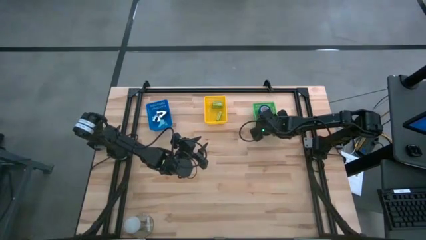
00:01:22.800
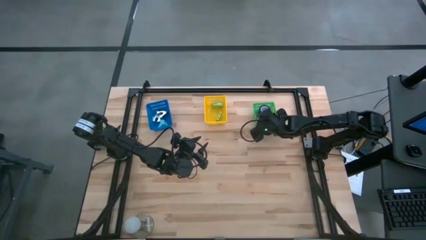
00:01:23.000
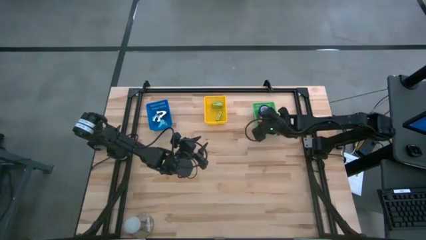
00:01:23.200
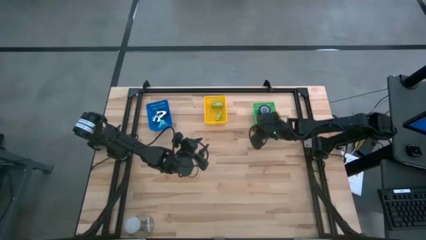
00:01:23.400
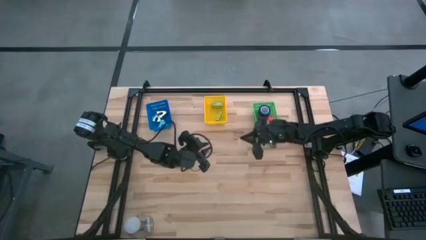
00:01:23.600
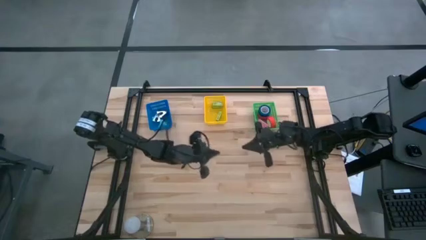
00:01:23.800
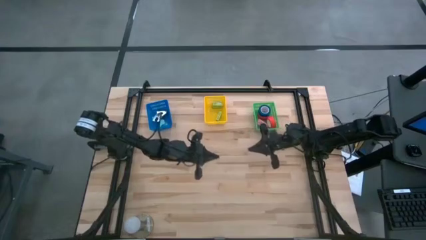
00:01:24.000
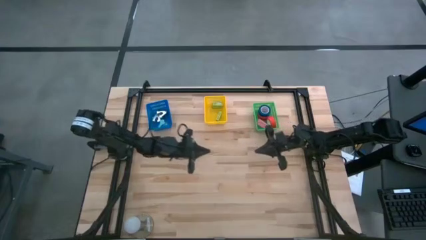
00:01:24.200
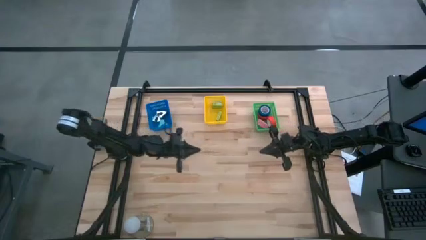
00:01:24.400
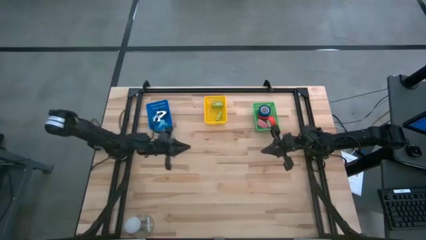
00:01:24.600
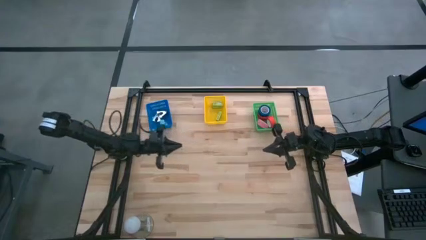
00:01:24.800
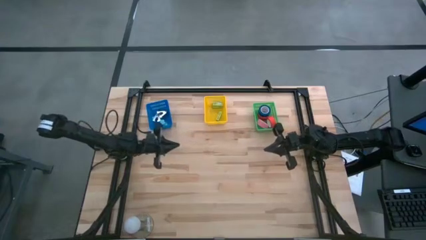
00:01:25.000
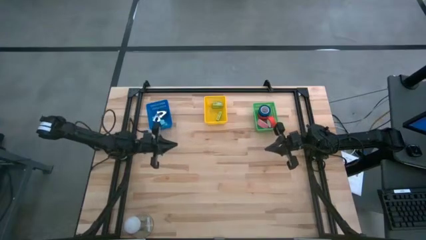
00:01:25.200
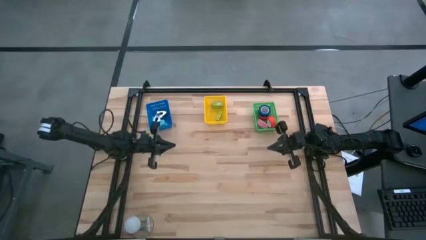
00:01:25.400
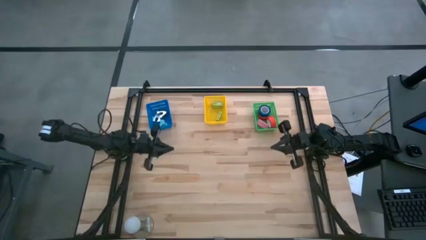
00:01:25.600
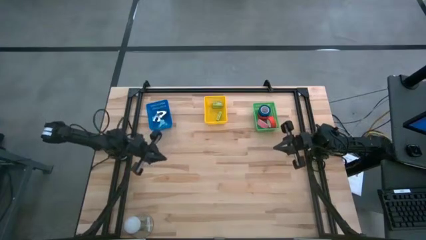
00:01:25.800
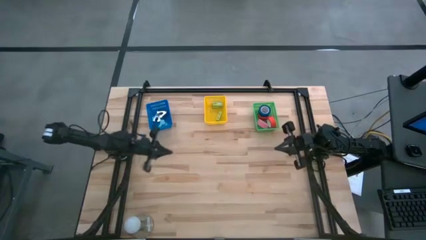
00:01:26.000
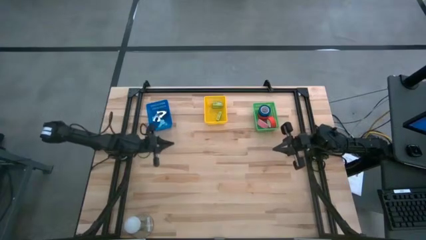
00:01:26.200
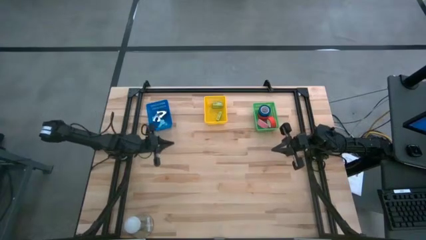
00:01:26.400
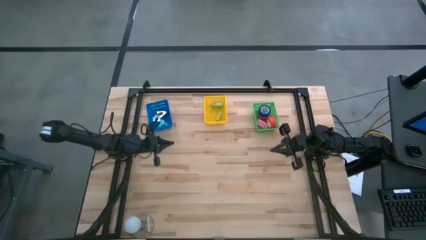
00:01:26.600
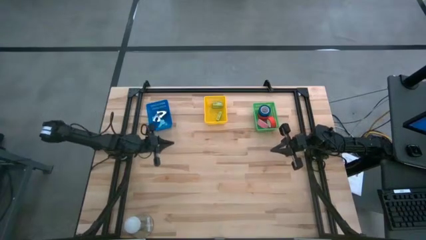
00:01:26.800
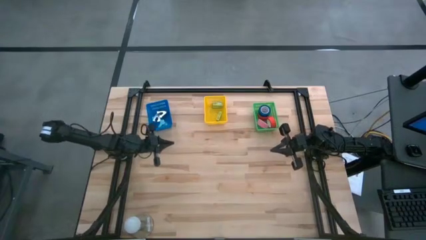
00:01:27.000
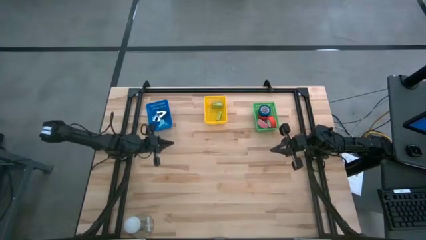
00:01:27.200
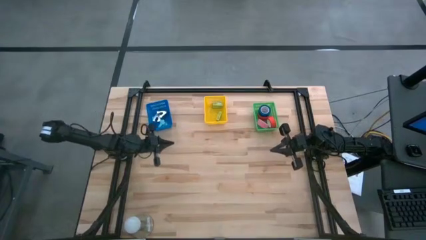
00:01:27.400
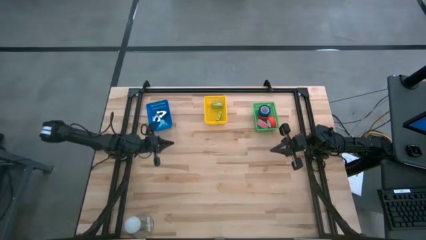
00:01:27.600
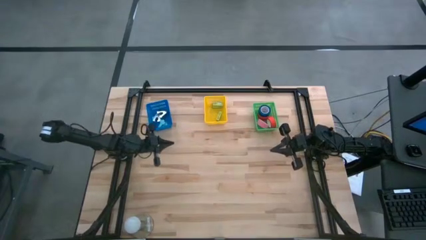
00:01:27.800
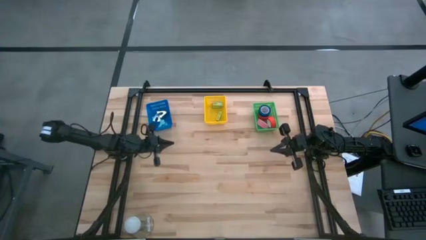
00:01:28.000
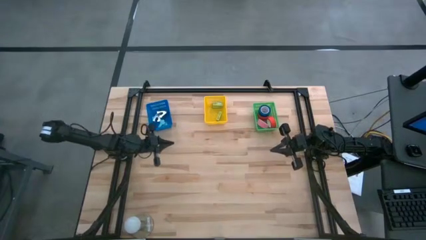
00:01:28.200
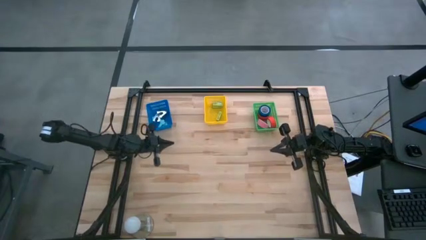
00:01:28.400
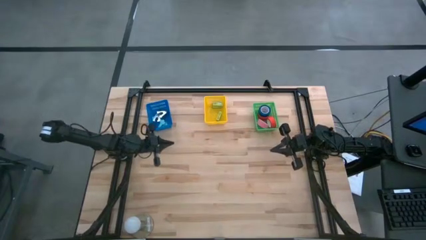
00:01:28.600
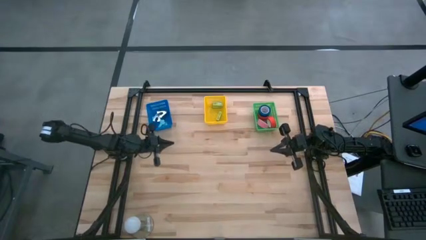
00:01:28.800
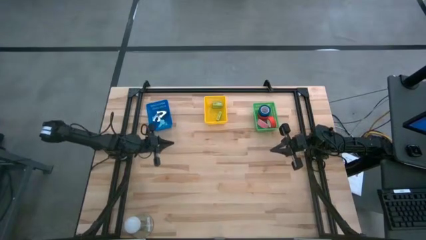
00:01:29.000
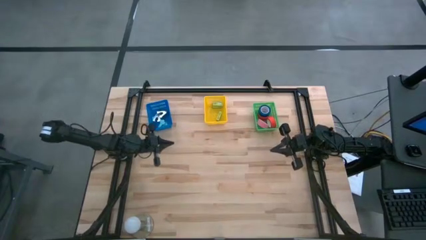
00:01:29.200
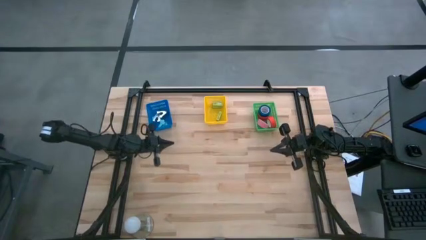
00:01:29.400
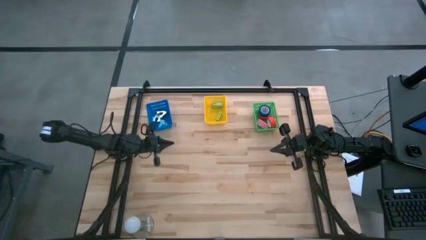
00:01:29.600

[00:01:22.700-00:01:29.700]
Task: Pick and place Stapler, Stapler remover, tape
Return to Home Position

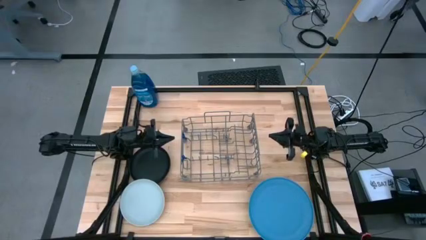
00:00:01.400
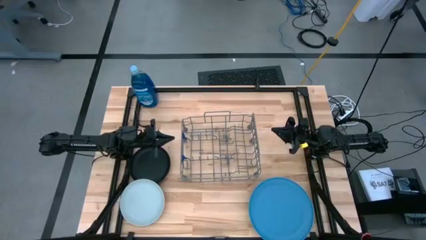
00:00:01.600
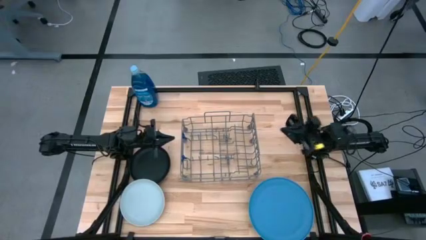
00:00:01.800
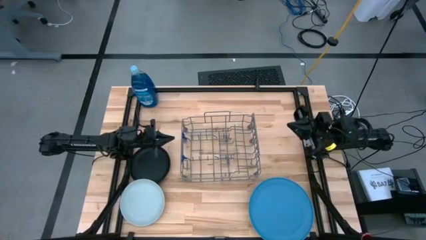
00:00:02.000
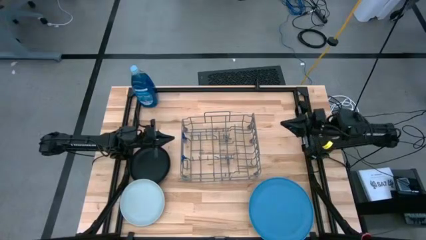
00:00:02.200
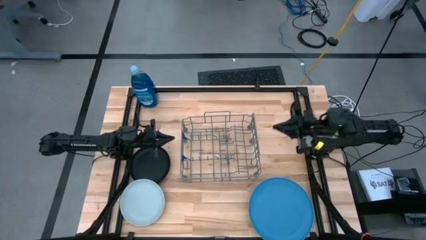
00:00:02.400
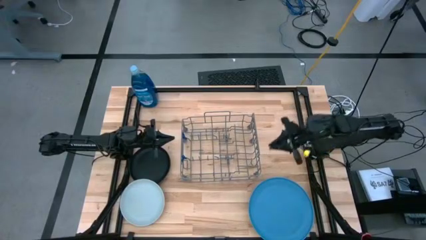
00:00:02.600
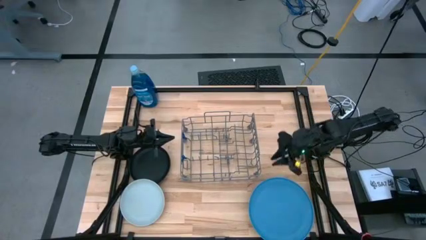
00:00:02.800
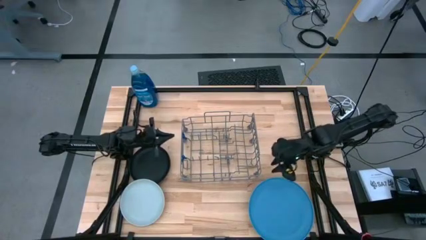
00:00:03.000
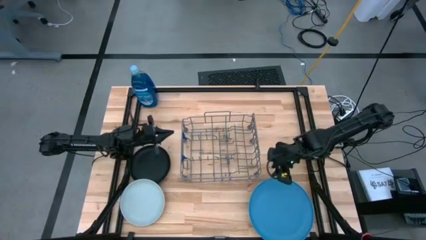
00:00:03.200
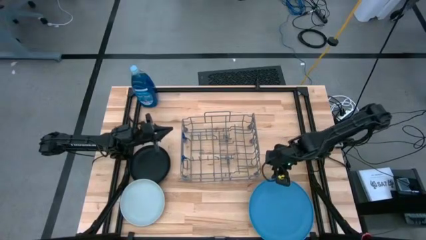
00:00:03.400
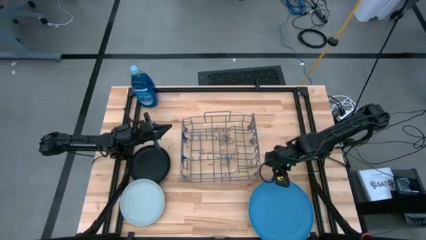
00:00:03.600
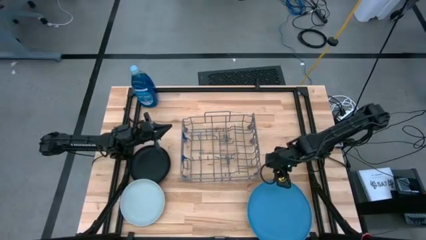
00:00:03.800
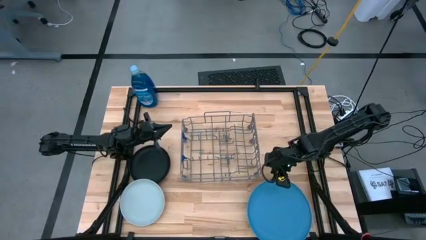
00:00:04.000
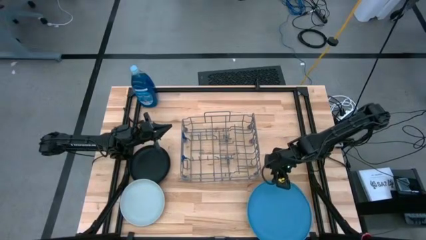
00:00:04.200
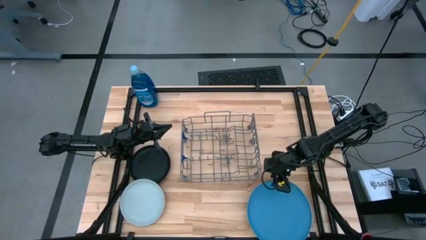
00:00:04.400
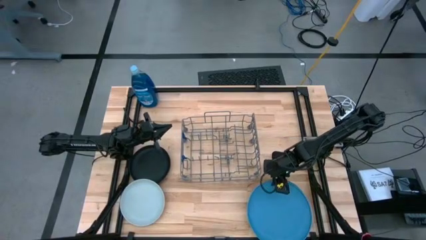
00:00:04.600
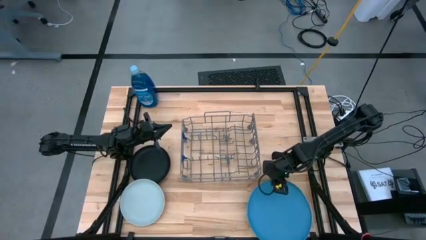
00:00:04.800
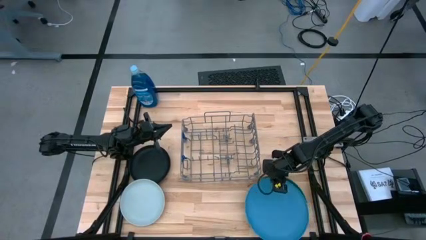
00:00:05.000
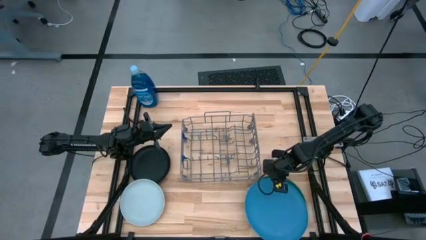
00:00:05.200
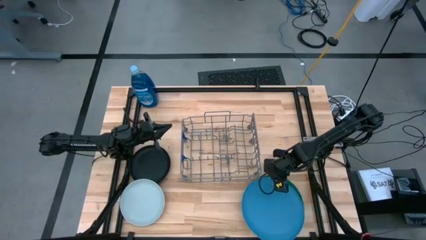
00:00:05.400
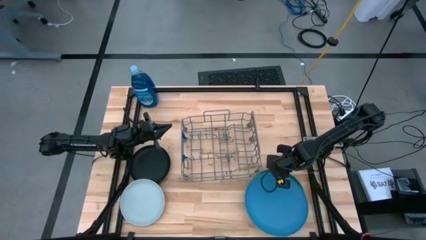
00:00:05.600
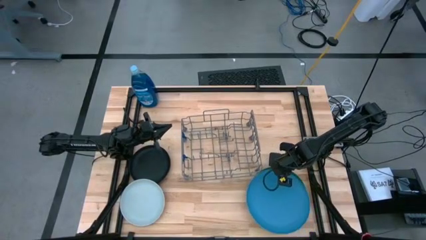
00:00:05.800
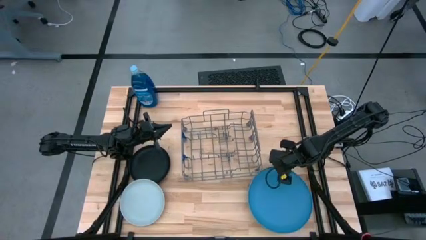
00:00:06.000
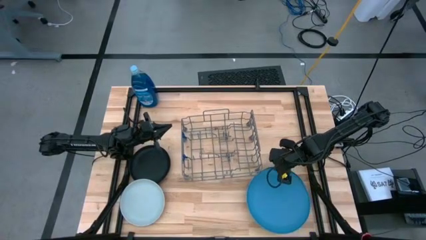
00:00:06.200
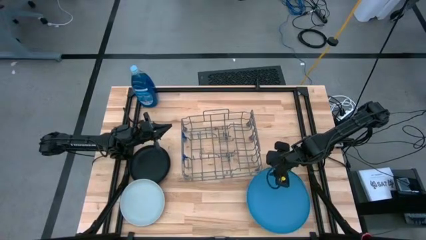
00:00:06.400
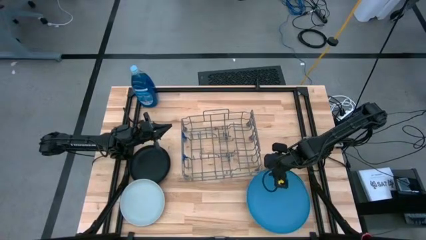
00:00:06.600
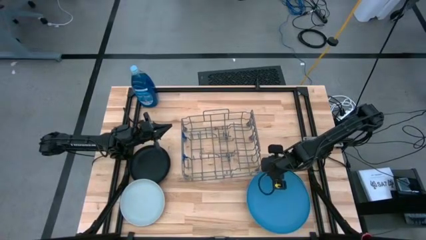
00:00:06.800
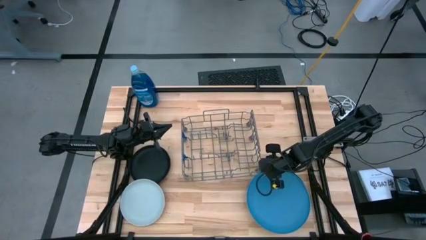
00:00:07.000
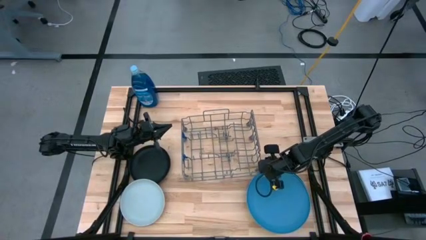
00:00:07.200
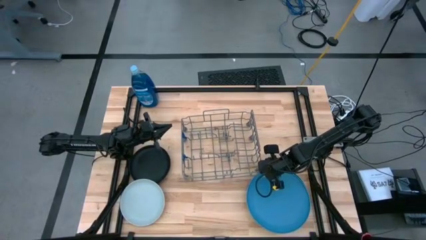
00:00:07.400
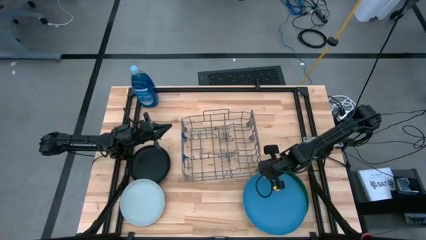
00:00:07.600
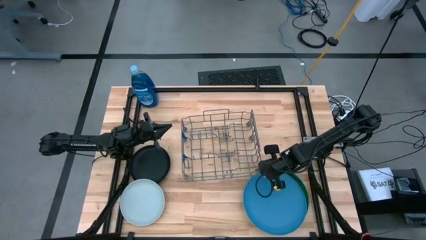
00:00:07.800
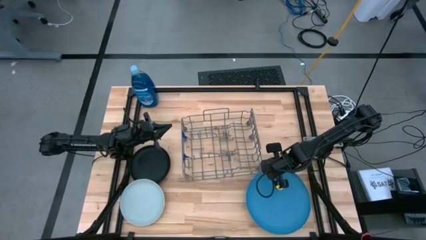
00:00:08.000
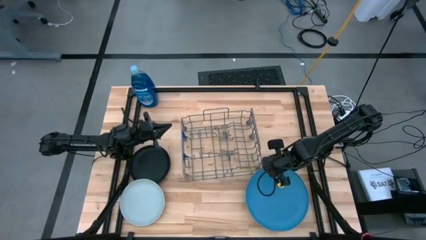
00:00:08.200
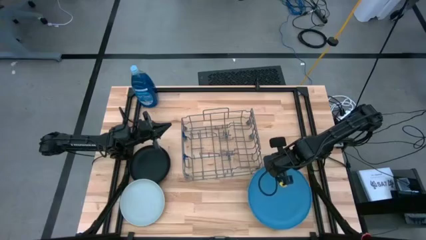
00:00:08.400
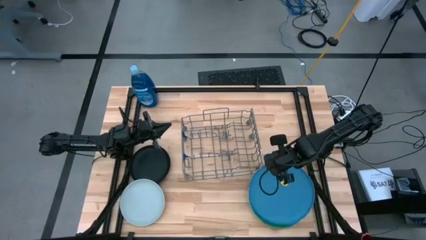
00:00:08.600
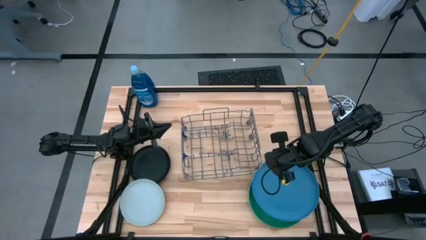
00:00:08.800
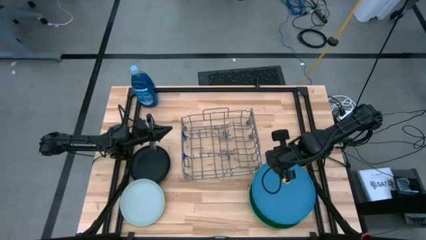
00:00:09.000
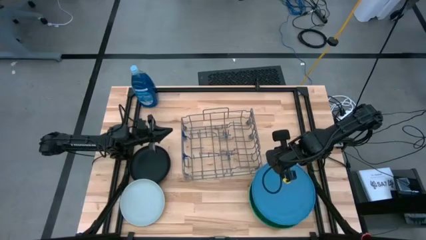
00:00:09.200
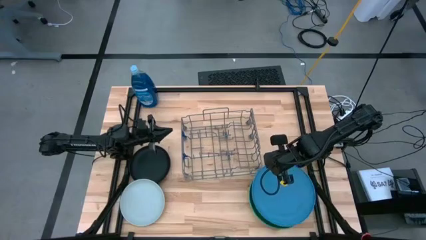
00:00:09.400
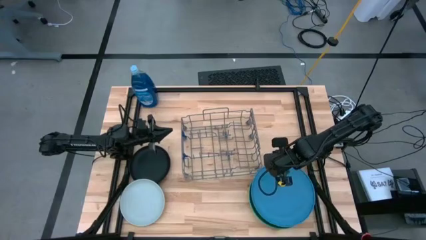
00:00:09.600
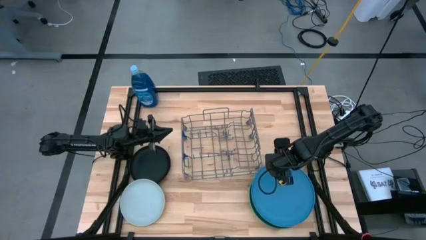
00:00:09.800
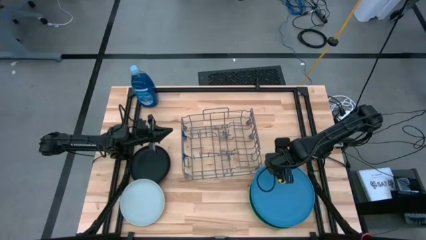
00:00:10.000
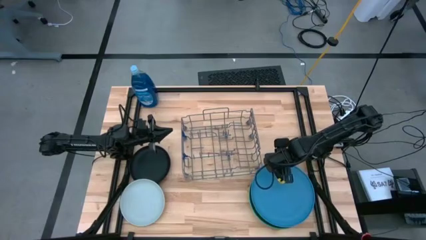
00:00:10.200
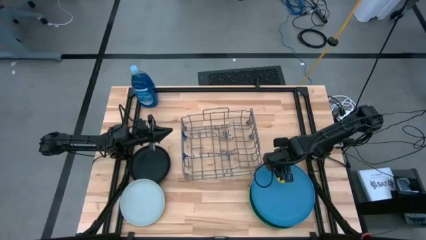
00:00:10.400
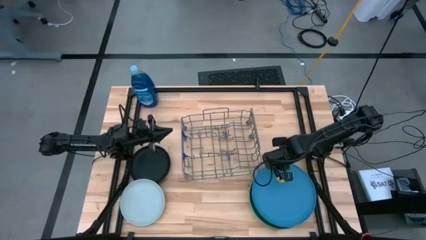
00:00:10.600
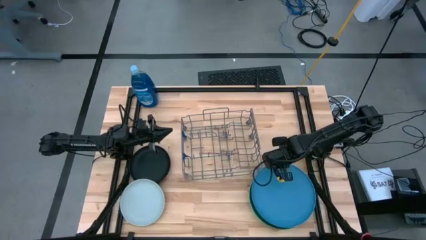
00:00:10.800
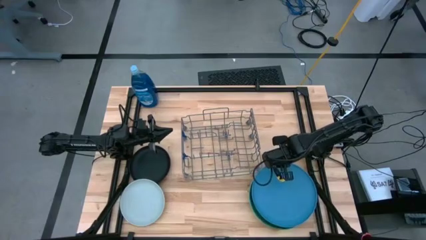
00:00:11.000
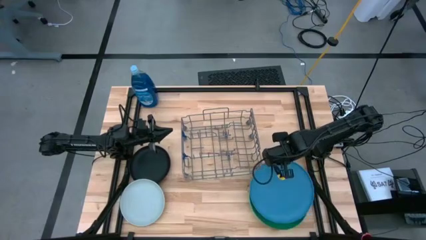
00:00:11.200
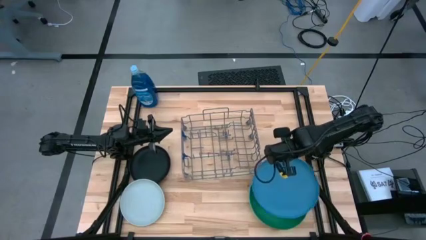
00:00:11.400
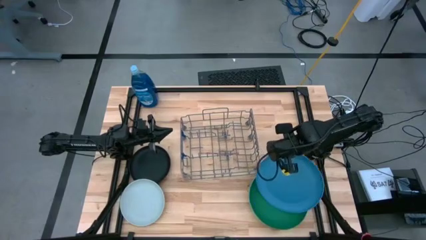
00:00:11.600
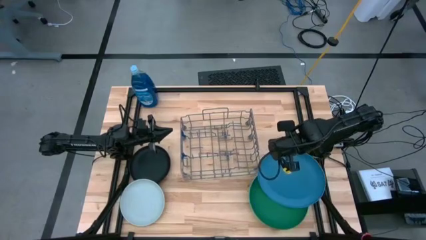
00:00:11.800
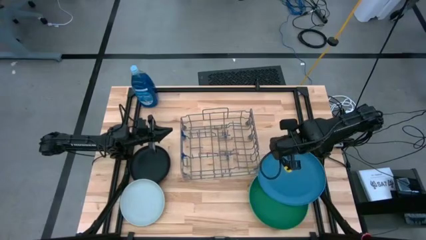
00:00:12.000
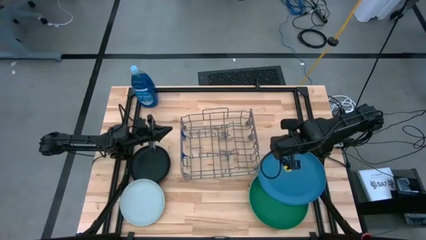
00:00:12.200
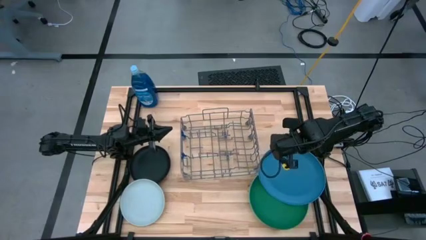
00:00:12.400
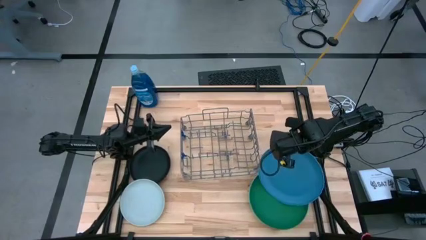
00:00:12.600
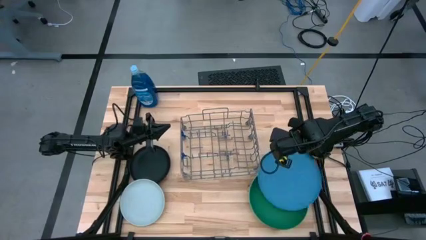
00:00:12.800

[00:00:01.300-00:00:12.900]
Task: Sort dishes
Put the blue plate into the gray dish rack
